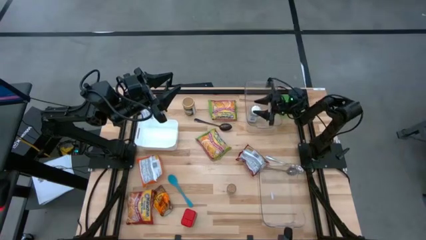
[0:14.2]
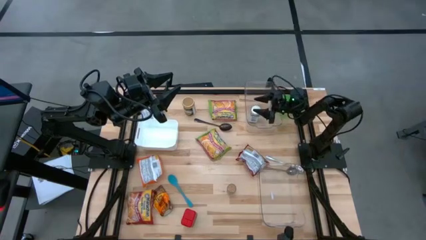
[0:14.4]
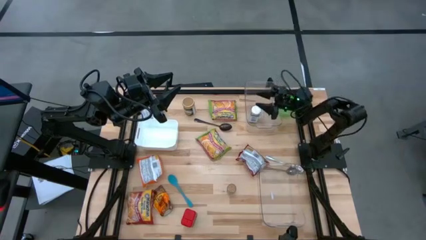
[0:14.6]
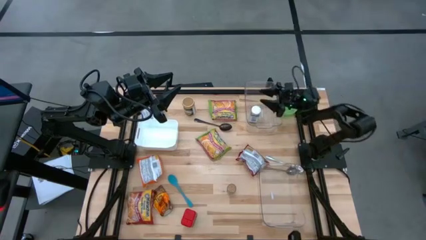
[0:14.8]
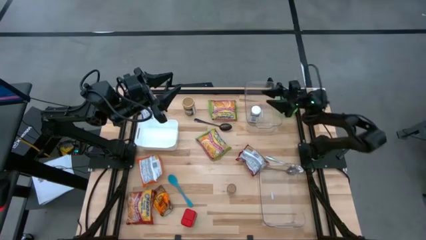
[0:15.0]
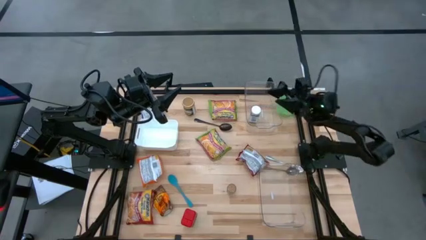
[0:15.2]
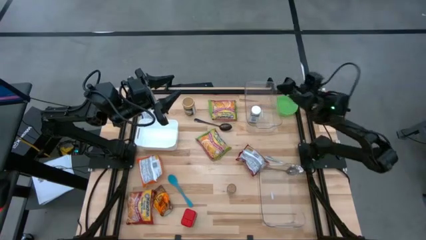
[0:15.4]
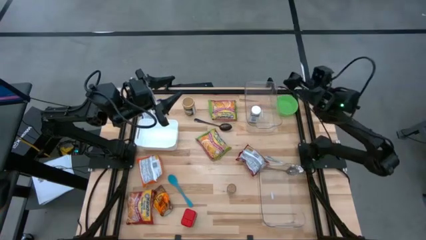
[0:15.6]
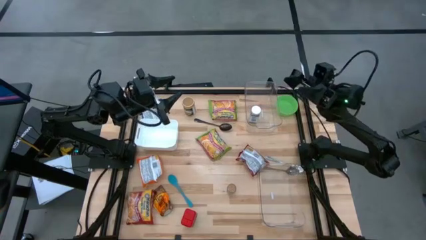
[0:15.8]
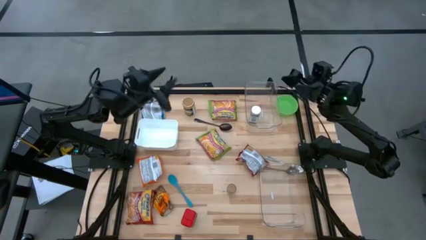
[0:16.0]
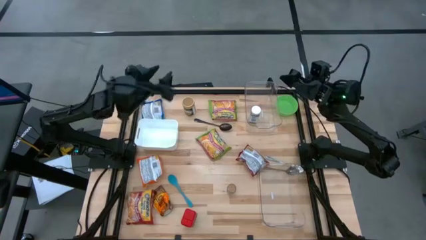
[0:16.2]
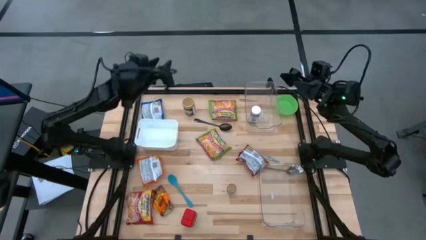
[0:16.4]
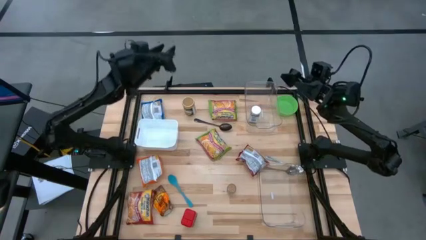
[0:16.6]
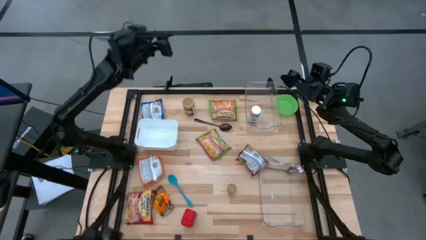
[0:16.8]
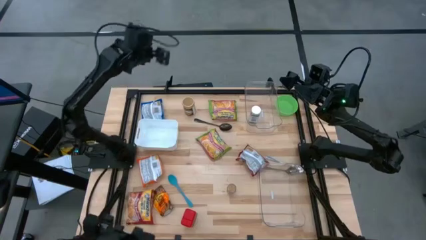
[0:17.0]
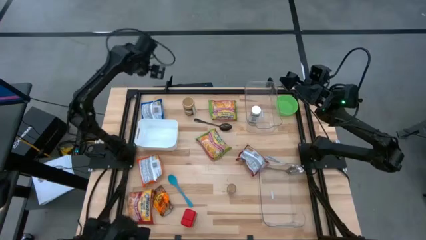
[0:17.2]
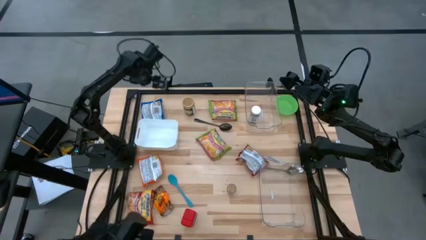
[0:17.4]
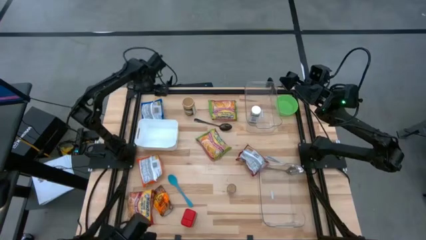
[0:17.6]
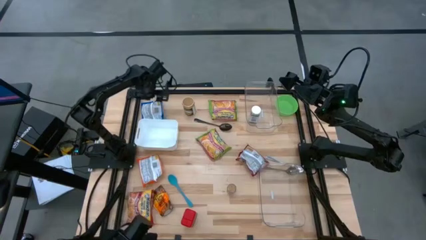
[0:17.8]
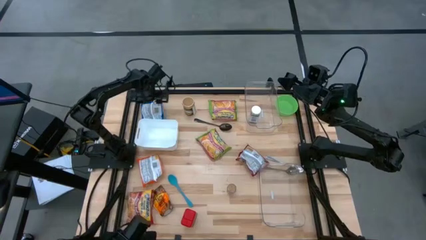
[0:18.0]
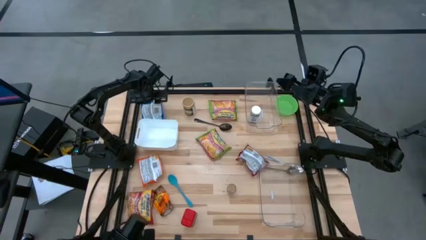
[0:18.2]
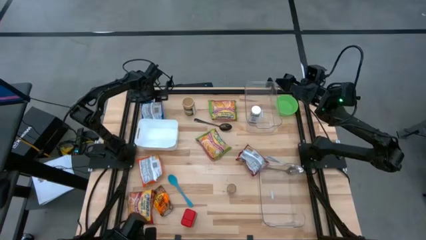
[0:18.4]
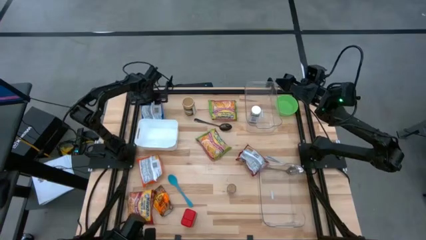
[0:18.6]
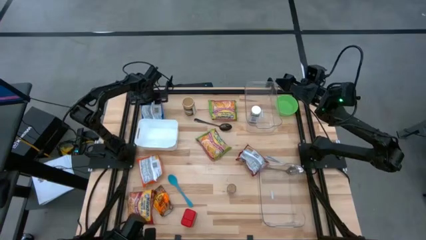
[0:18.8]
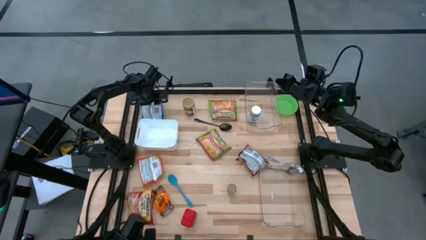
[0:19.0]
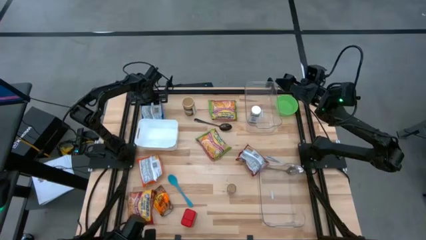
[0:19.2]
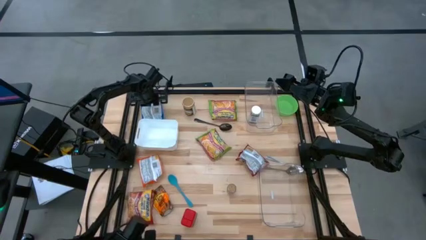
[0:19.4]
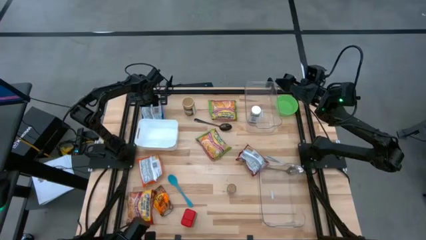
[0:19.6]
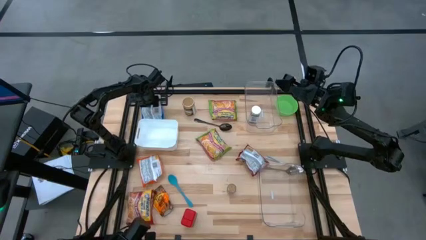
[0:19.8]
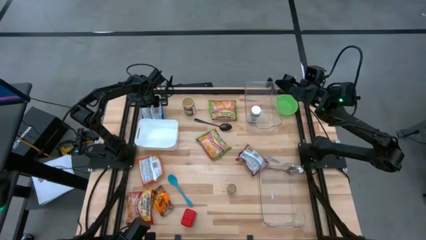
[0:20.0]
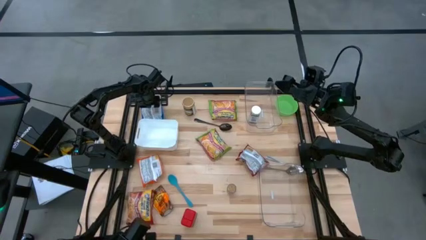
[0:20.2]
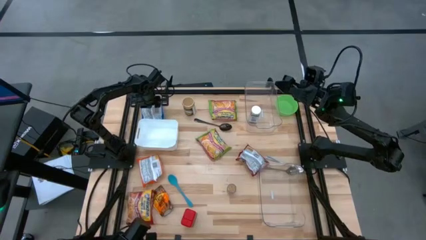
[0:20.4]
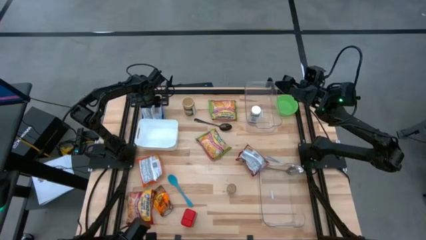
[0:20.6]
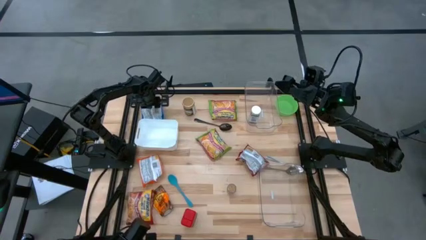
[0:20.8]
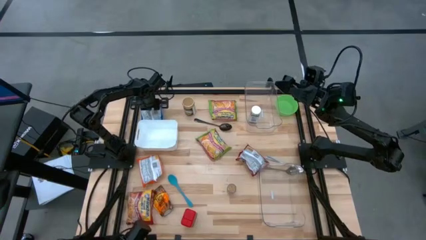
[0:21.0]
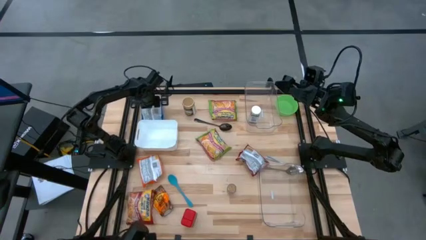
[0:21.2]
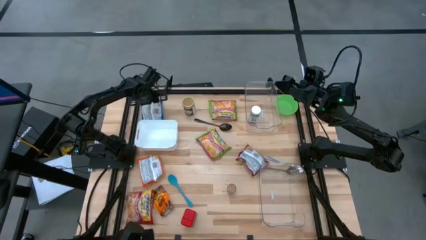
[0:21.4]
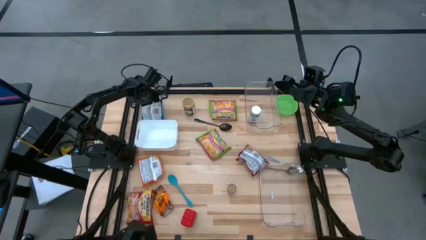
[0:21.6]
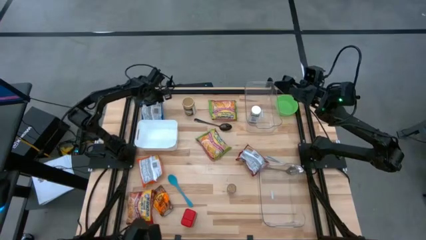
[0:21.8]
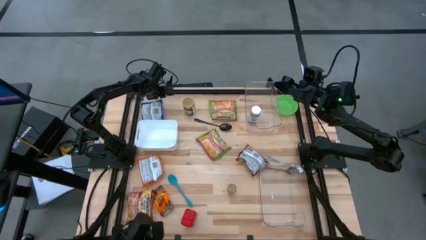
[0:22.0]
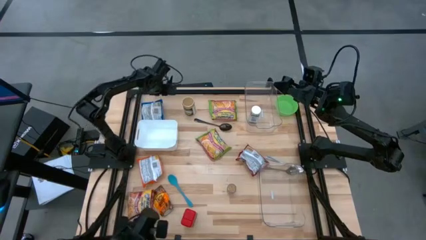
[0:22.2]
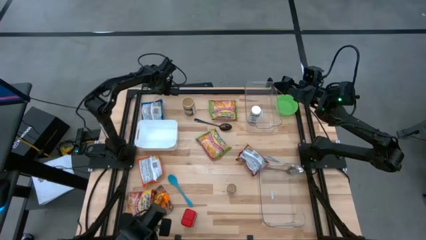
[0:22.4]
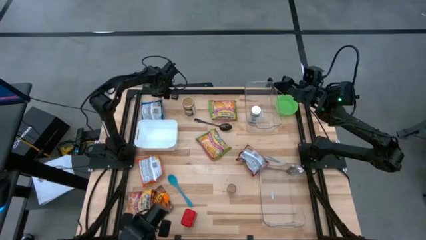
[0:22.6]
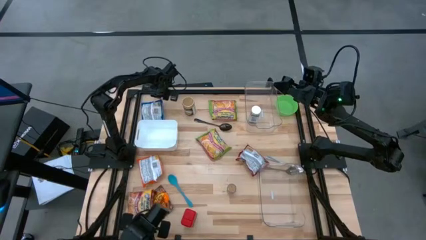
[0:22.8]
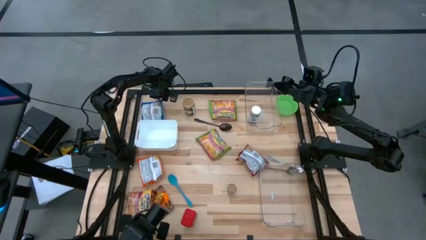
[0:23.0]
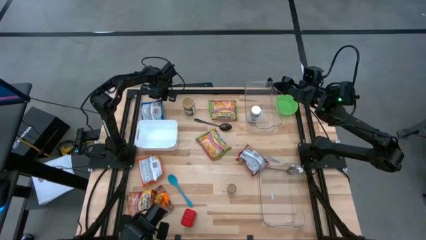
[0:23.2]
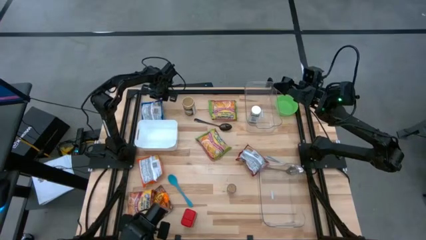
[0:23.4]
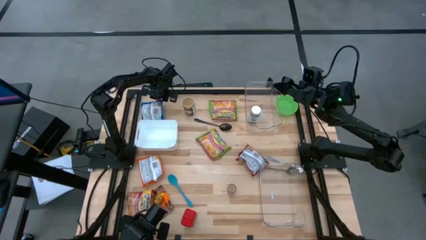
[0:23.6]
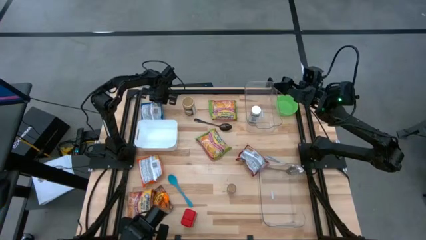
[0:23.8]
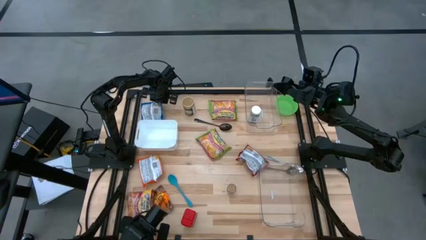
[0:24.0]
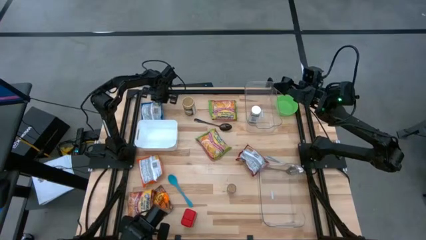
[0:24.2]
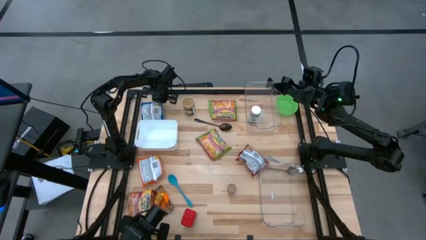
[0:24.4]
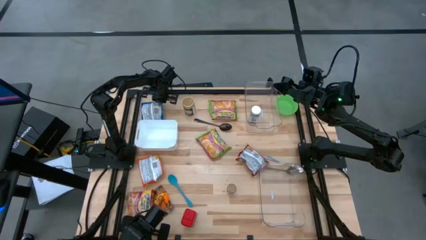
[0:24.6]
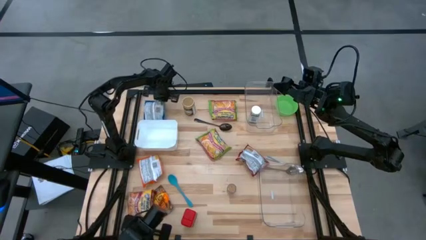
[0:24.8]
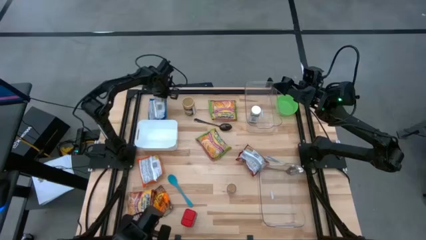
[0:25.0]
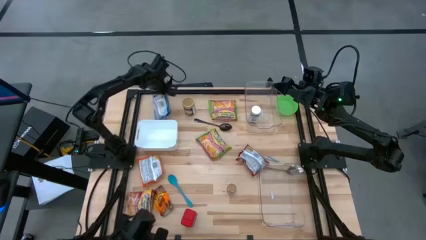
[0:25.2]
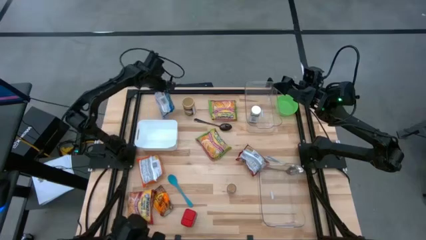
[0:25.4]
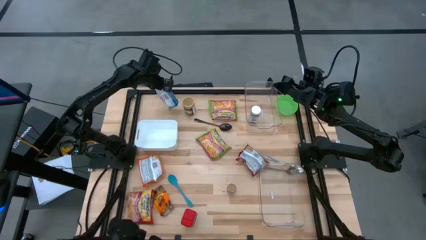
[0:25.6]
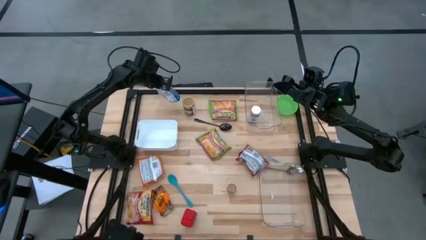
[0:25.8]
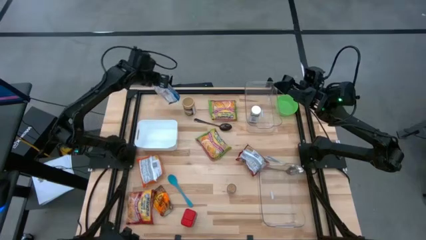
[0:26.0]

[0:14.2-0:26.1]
Task: Pick & Place Food Item
Put the blue noodle pack into the bottom transparent bin
